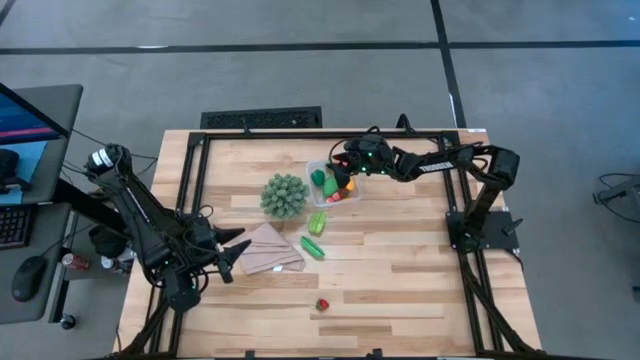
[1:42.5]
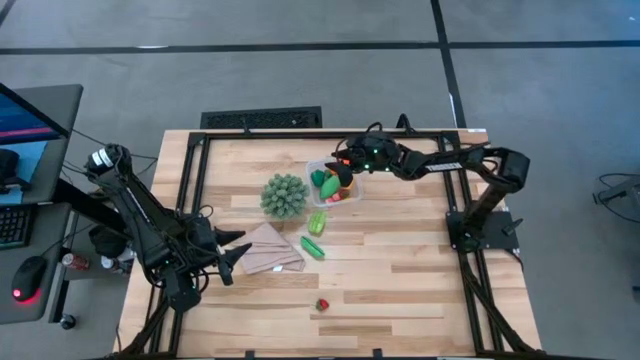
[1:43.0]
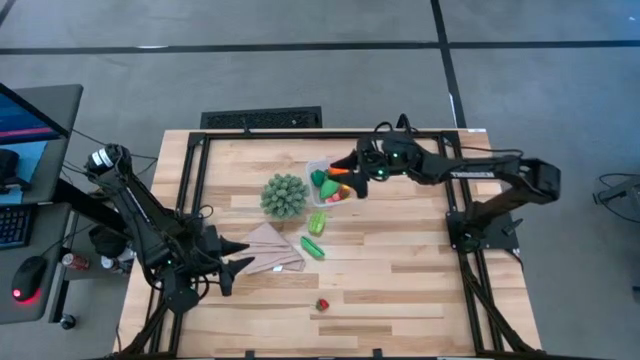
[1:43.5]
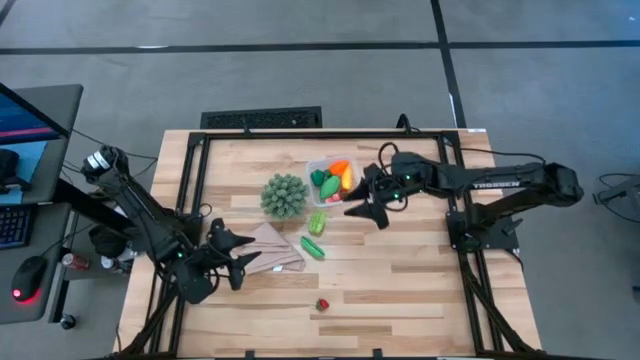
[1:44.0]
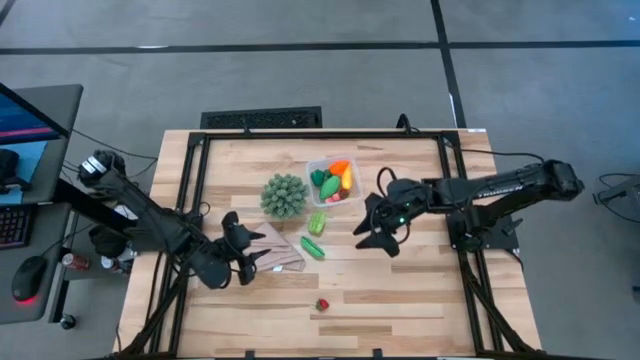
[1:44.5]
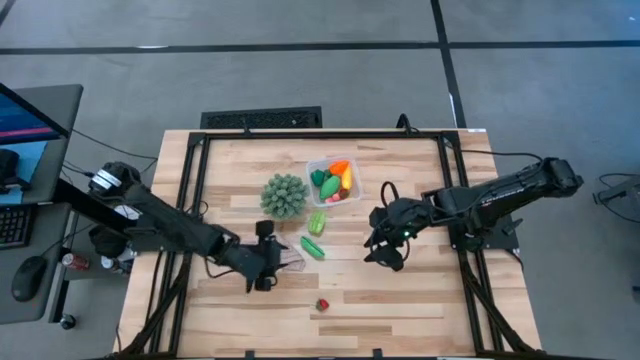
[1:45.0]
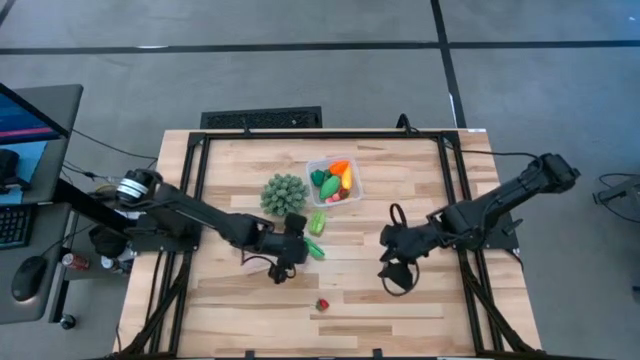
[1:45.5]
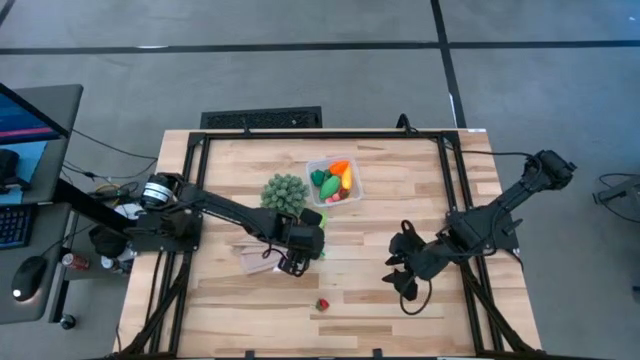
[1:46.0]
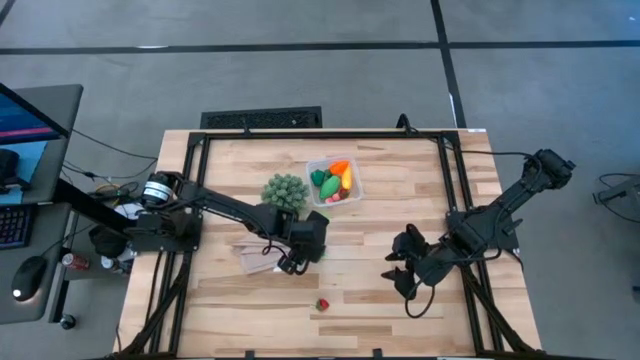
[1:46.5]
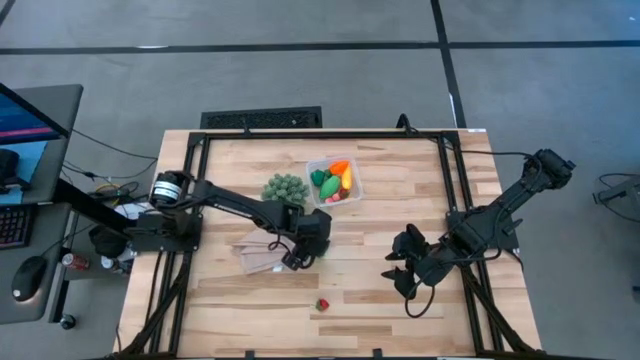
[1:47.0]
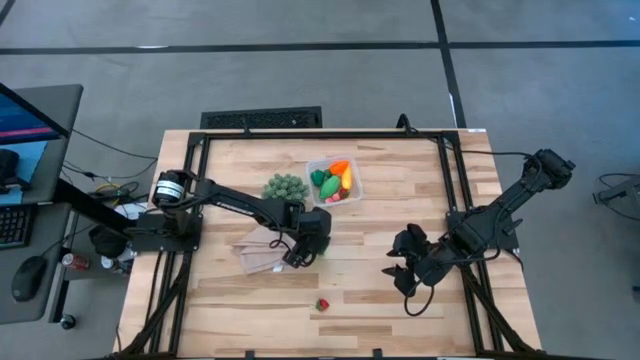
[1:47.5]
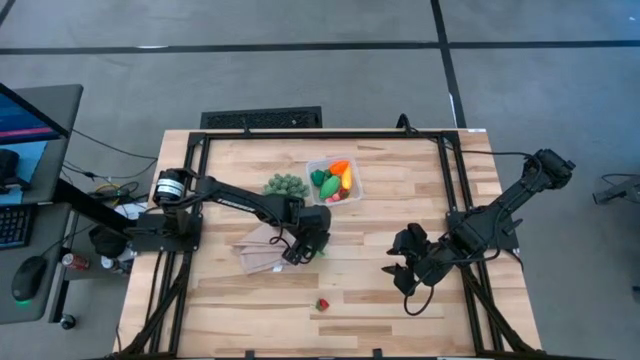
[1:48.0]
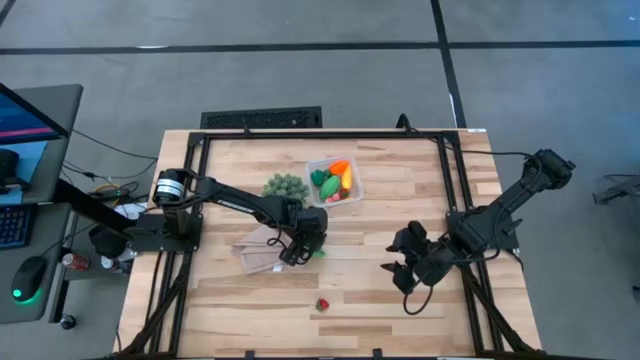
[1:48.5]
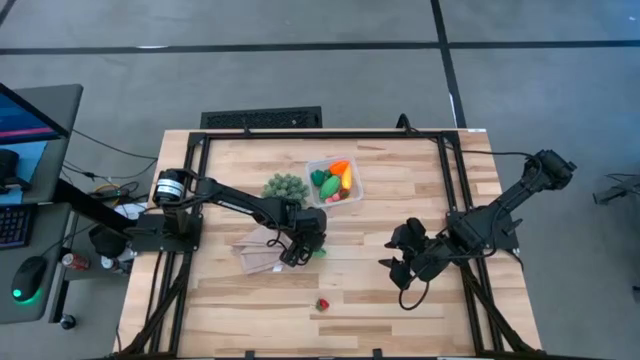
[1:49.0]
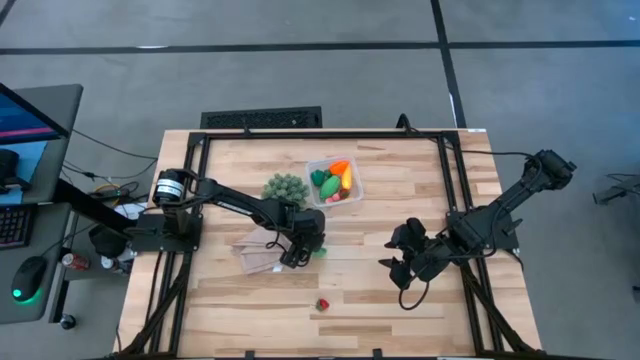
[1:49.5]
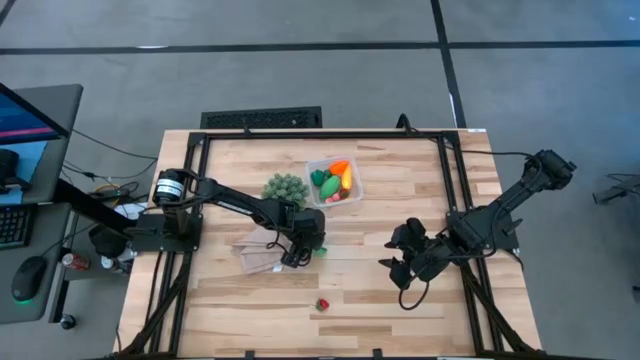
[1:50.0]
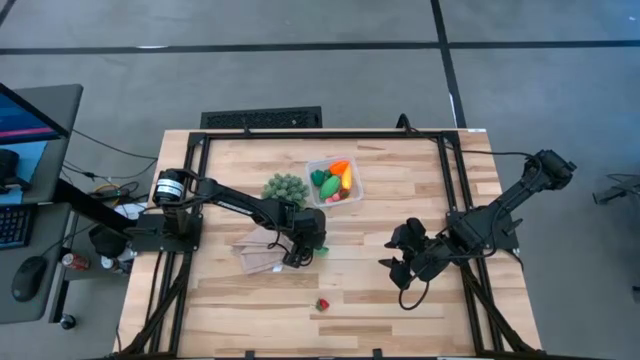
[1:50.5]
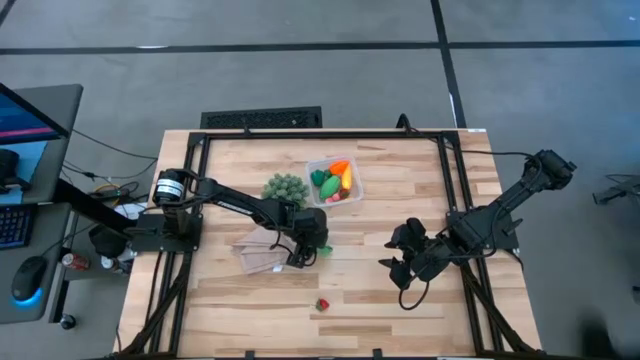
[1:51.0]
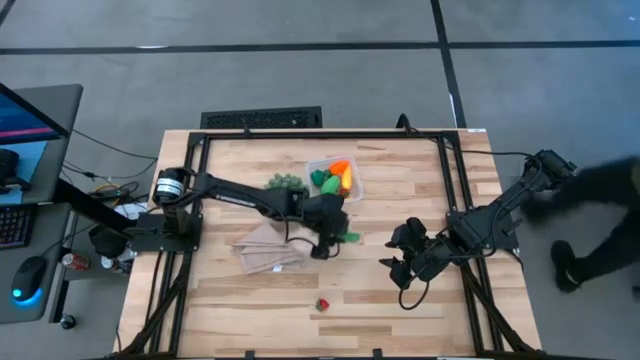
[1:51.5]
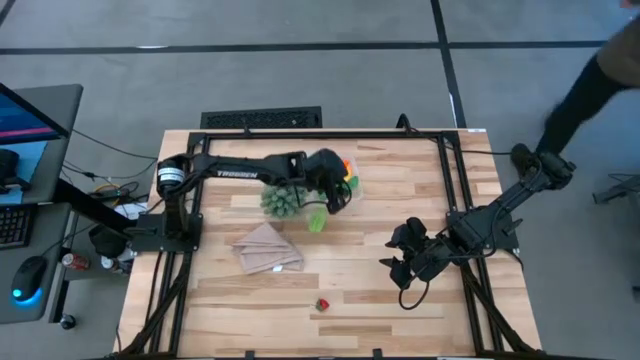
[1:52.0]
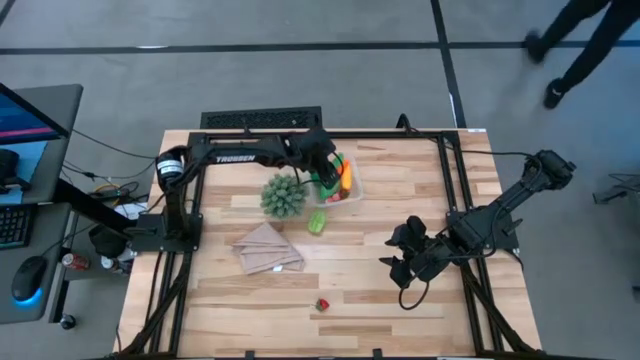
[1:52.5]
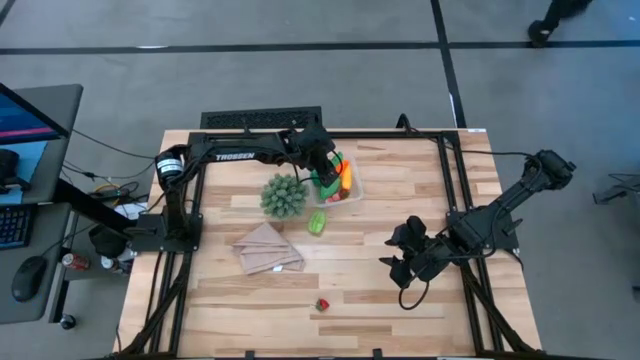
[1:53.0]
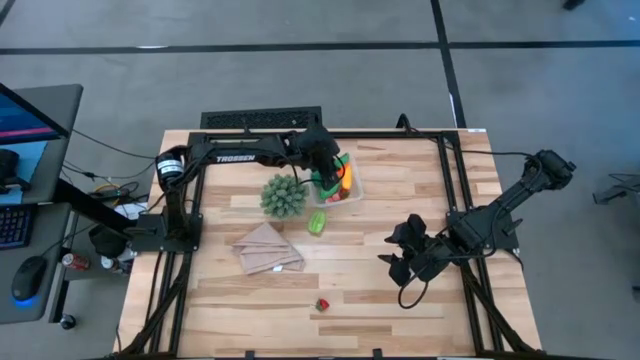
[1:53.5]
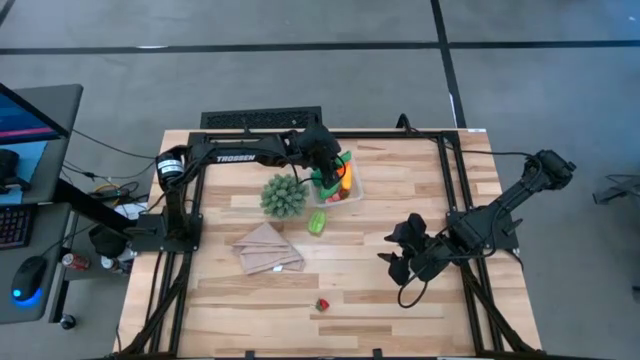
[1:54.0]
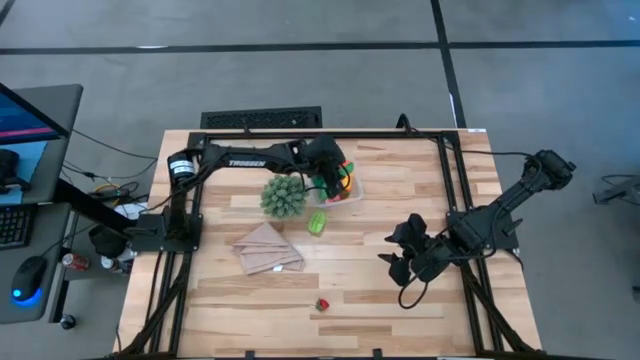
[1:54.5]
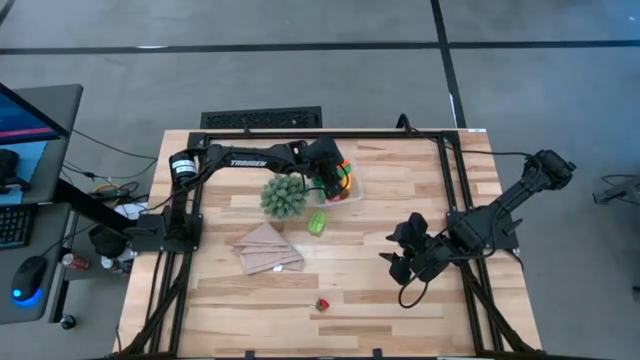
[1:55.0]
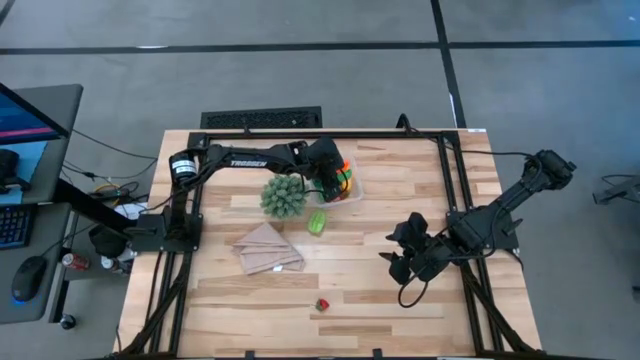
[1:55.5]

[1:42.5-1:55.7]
Task: Pick and placing Produce into tupperware
Put the green beans into the transparent bin

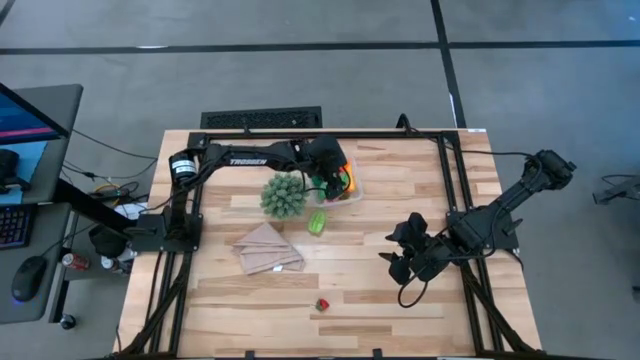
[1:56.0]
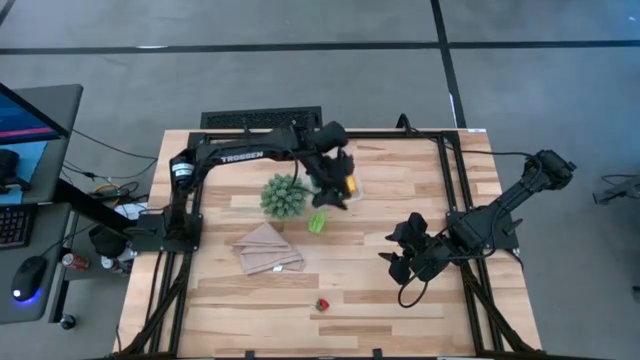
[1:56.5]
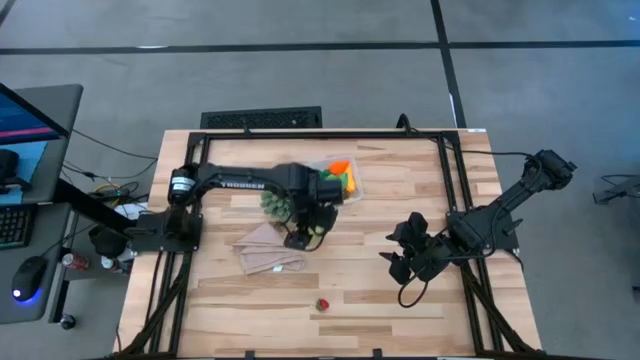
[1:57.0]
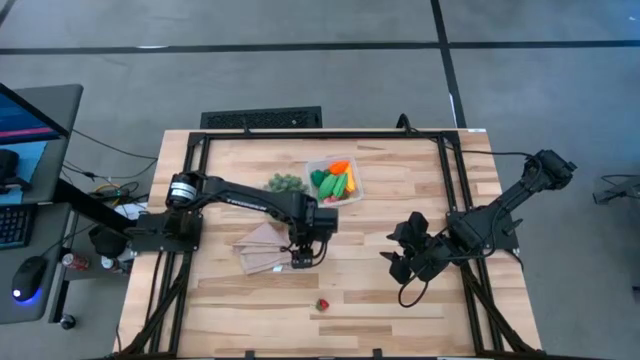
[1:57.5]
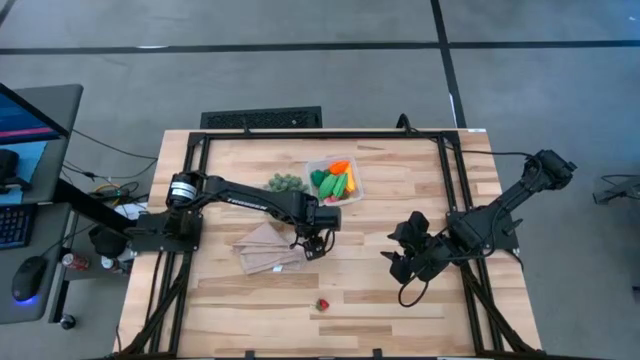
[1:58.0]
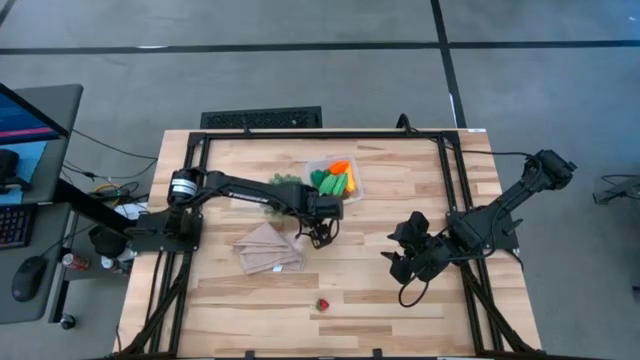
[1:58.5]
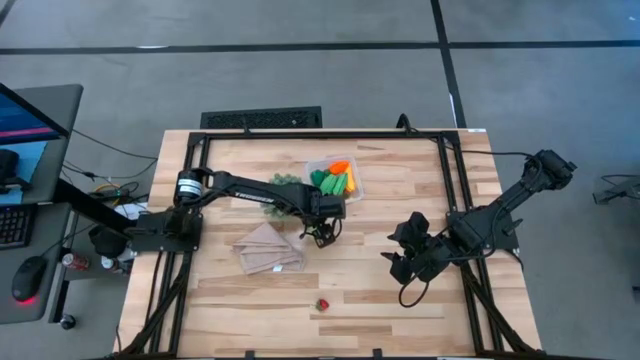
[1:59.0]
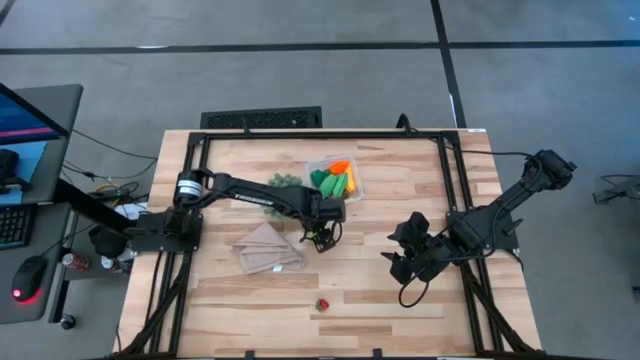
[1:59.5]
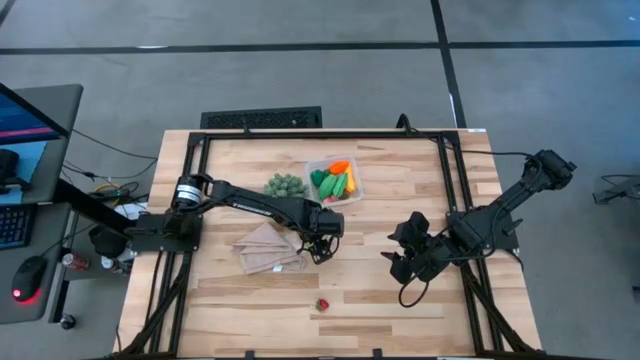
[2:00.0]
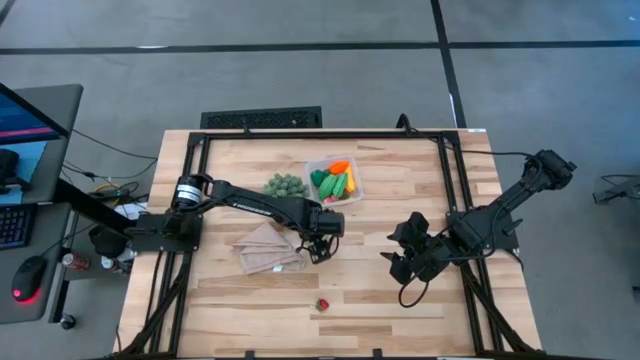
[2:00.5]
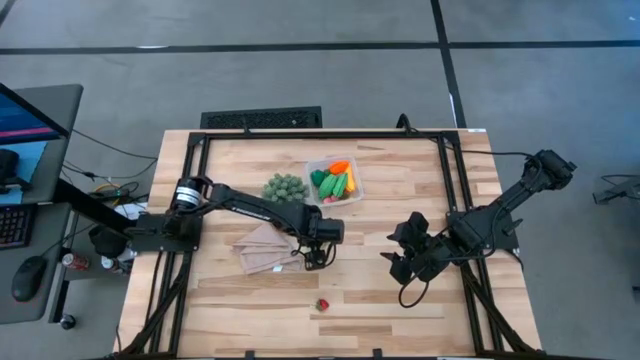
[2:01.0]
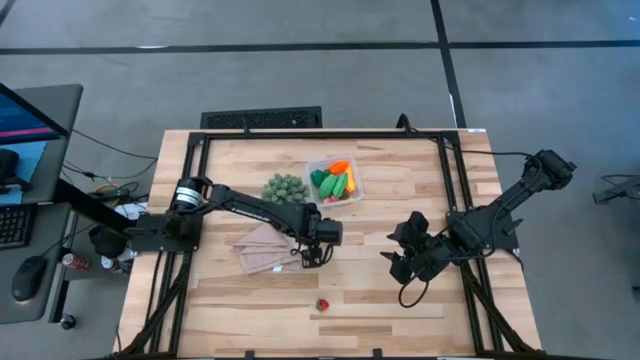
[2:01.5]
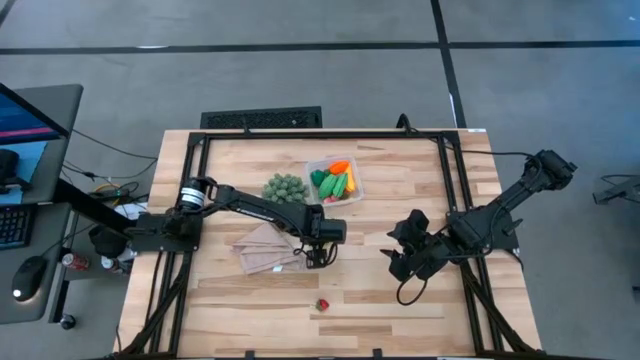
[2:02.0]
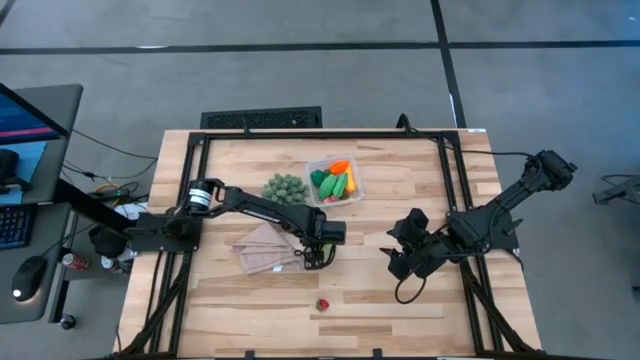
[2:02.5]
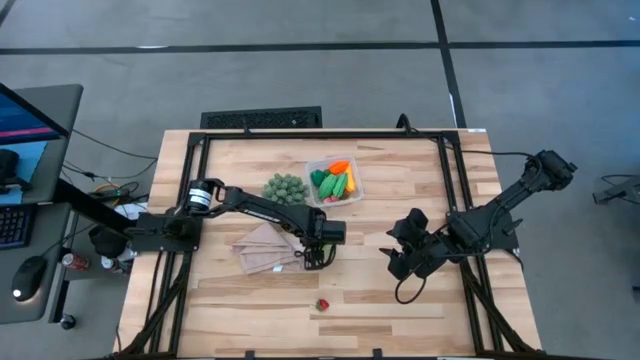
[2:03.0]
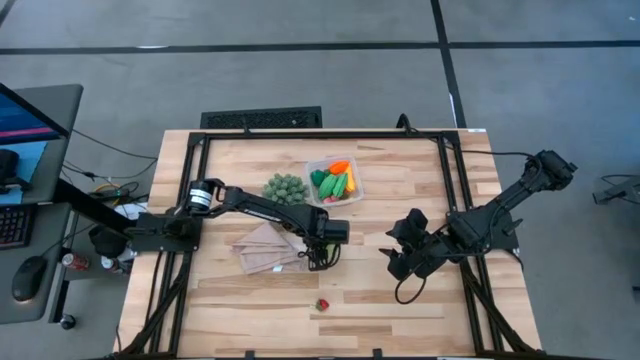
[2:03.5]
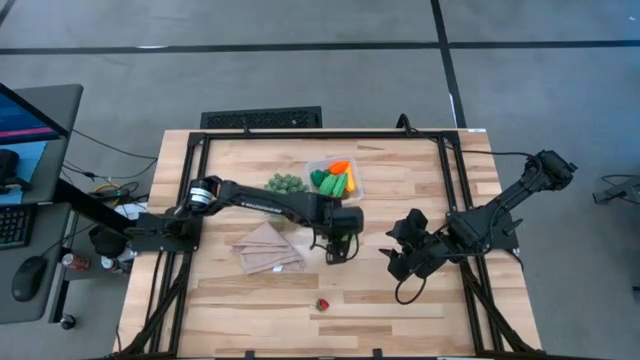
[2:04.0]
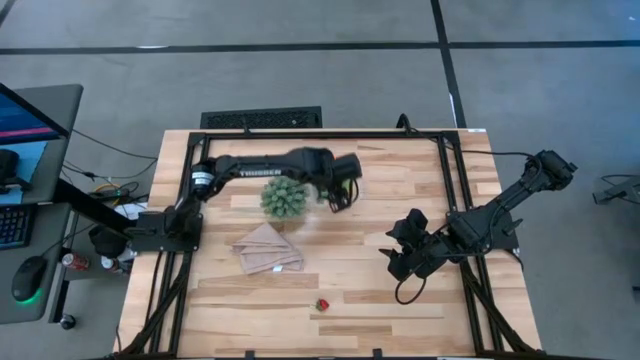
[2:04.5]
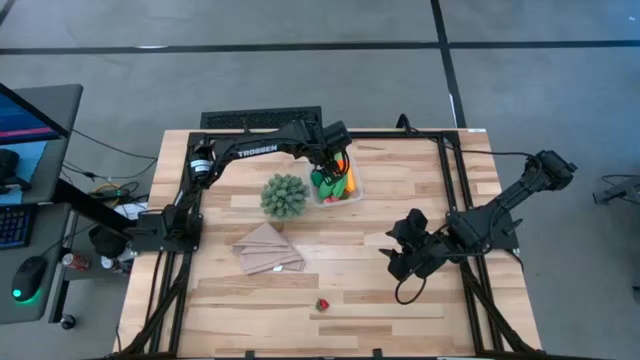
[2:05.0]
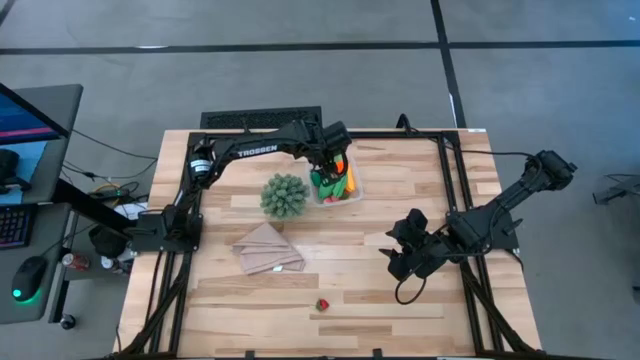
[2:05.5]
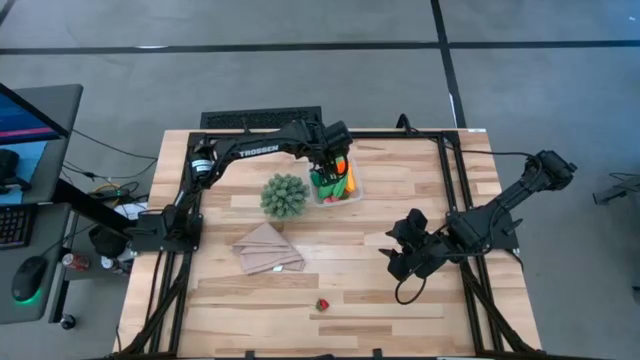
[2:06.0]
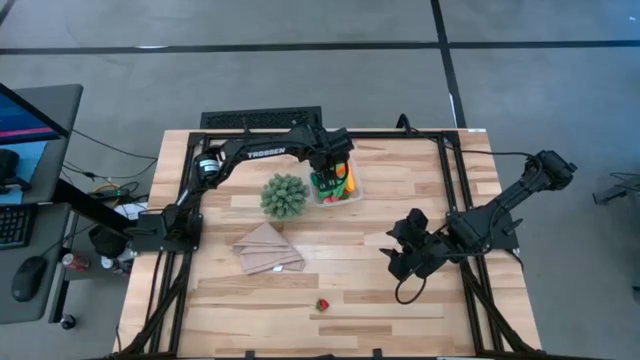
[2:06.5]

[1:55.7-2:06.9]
Put the green star fruit into the transparent bin
